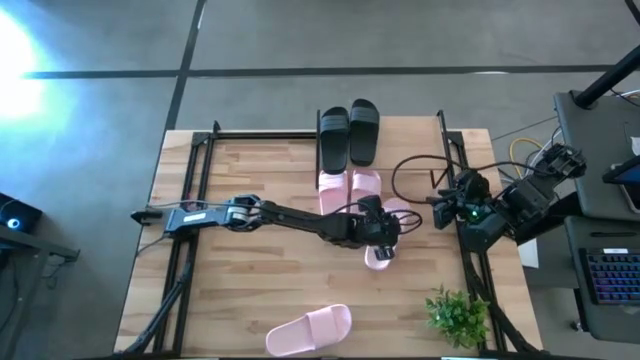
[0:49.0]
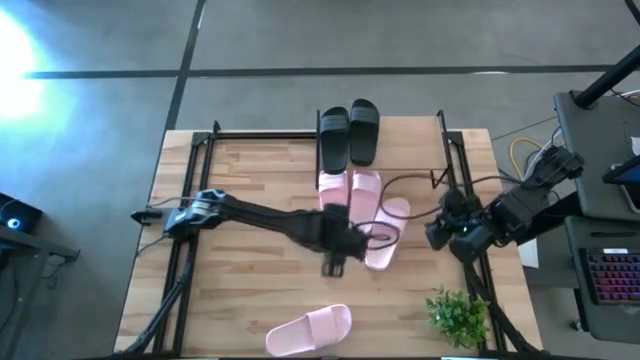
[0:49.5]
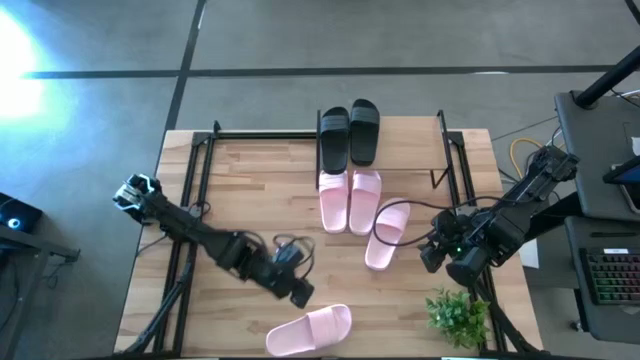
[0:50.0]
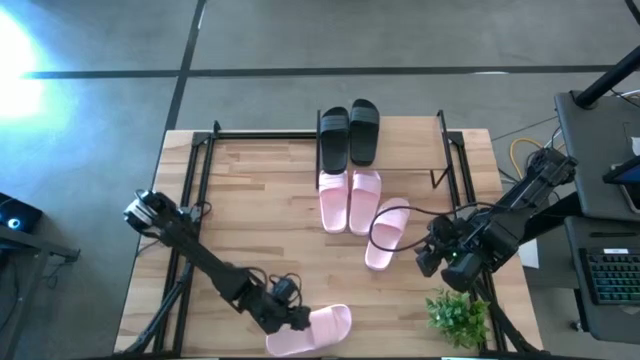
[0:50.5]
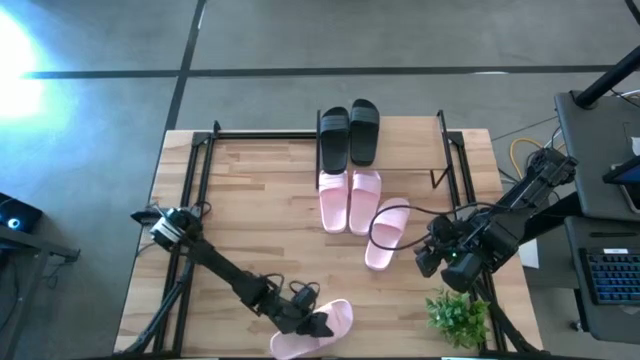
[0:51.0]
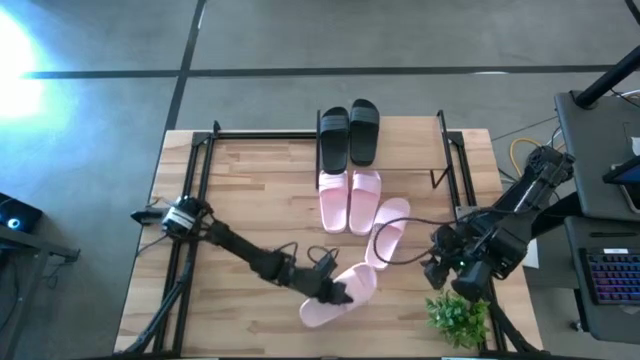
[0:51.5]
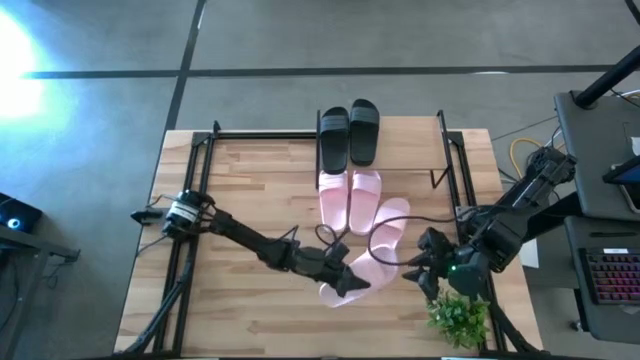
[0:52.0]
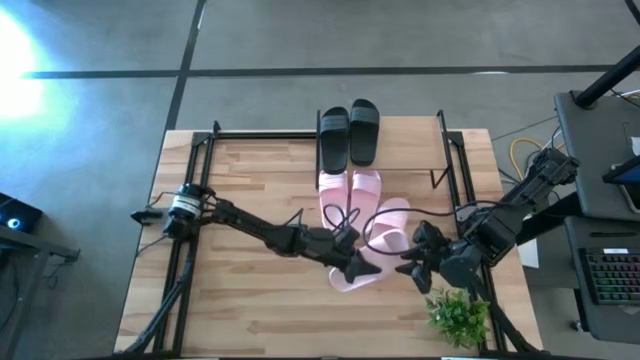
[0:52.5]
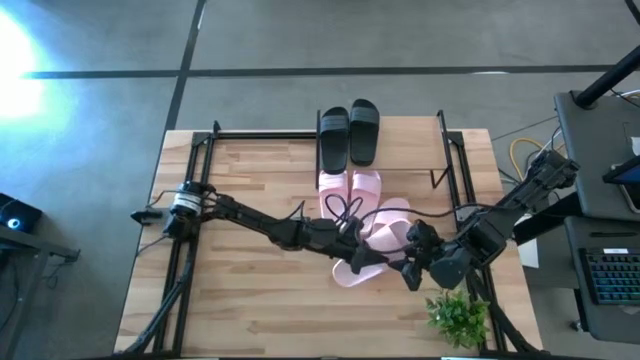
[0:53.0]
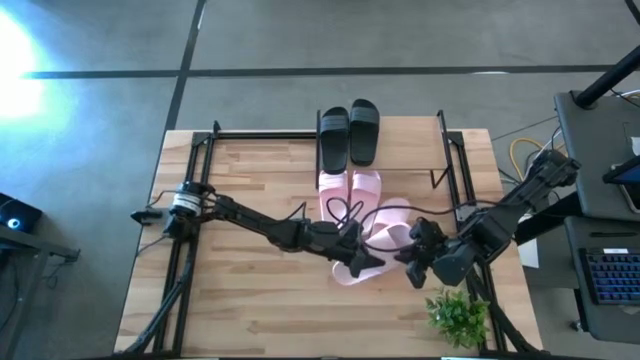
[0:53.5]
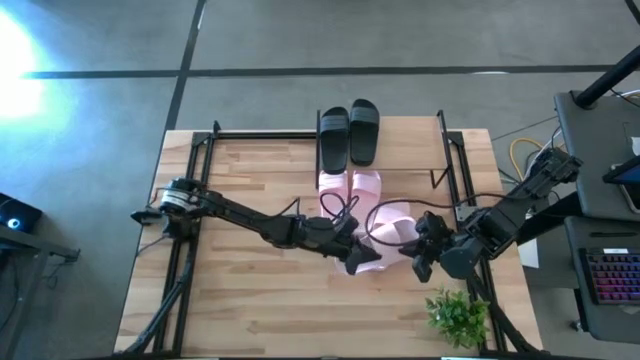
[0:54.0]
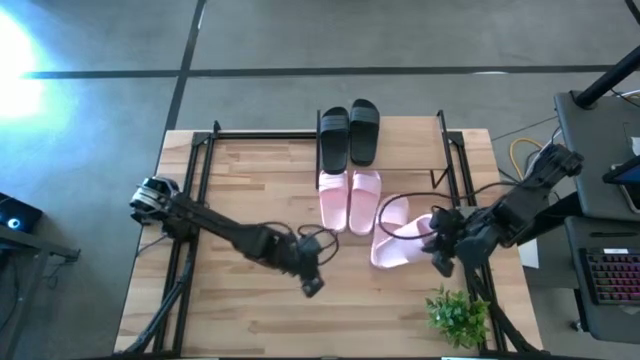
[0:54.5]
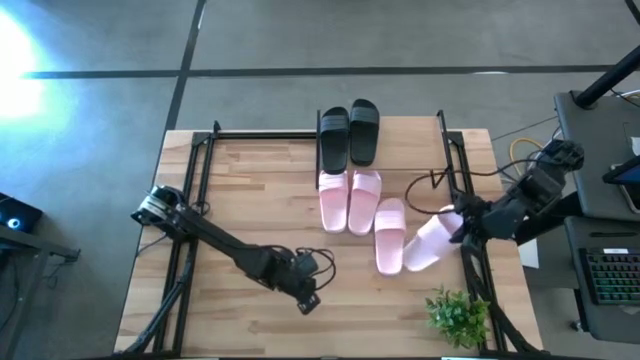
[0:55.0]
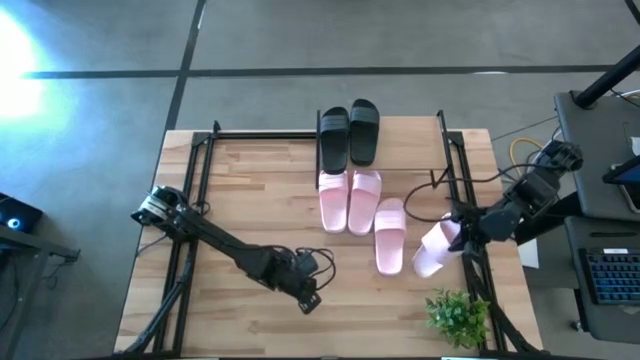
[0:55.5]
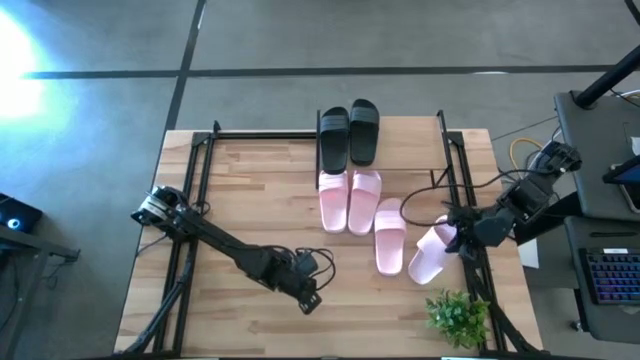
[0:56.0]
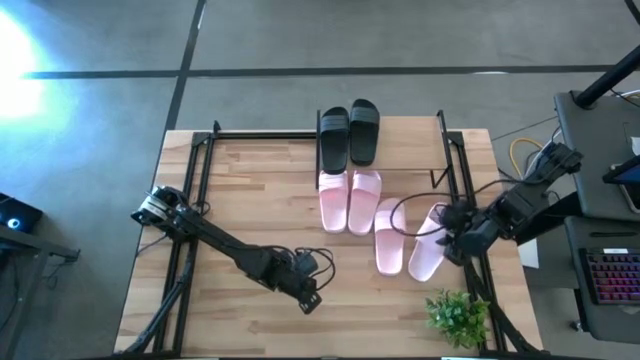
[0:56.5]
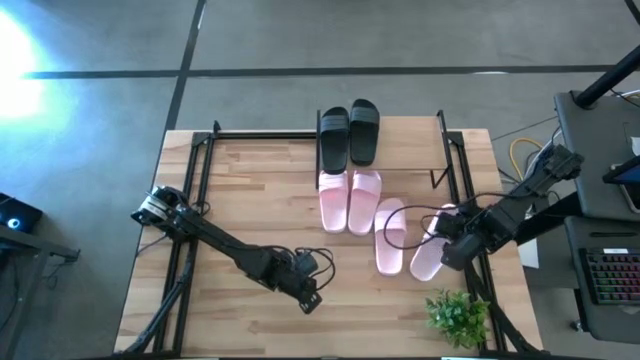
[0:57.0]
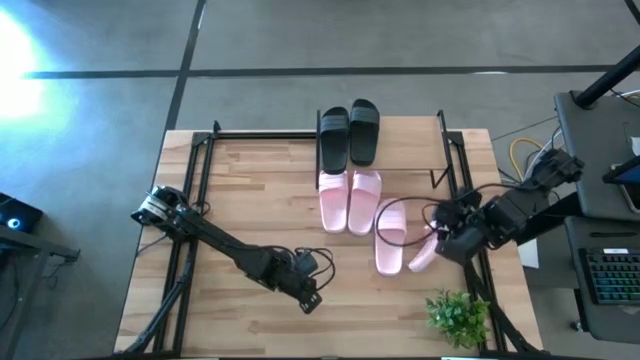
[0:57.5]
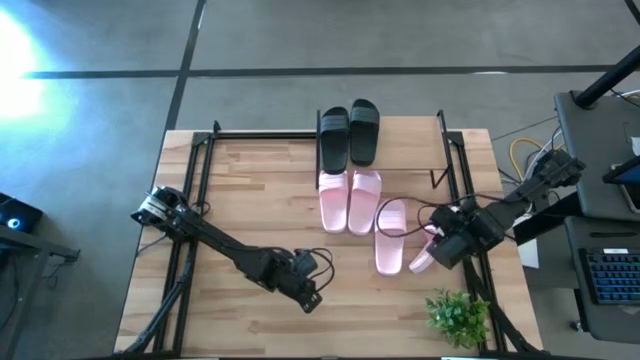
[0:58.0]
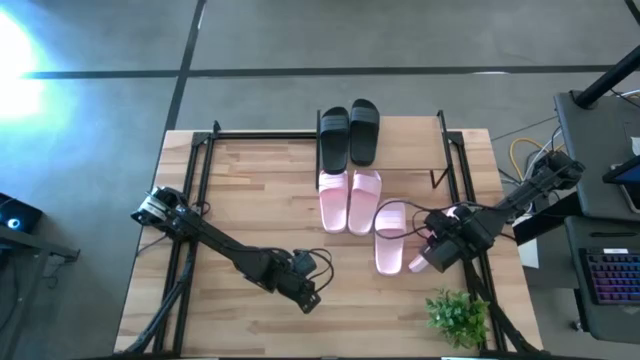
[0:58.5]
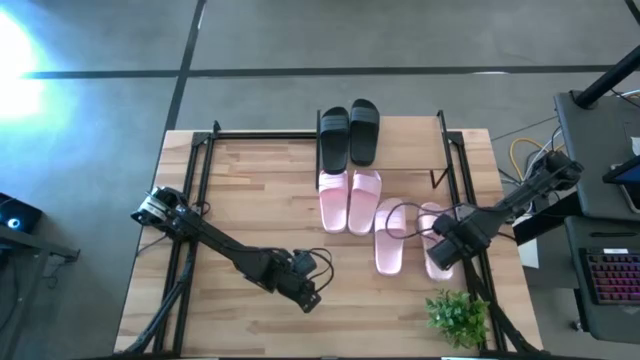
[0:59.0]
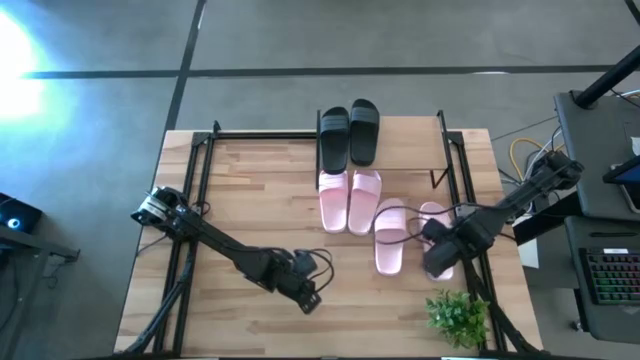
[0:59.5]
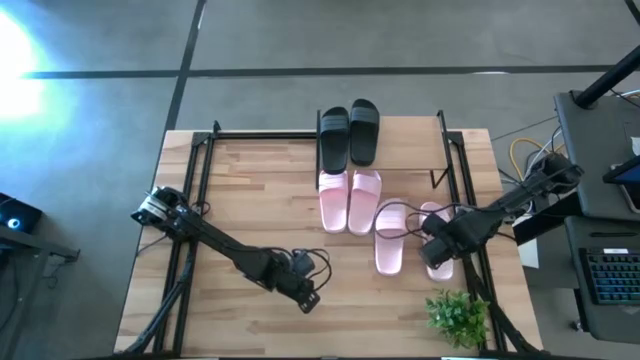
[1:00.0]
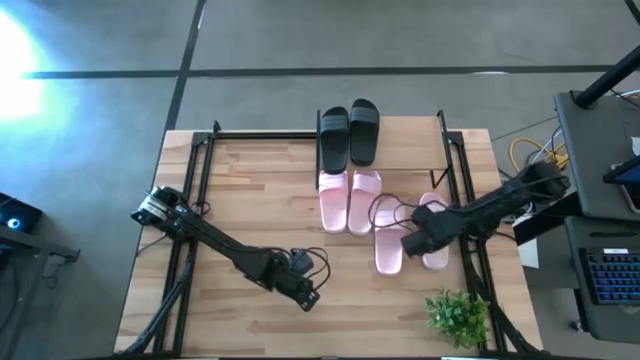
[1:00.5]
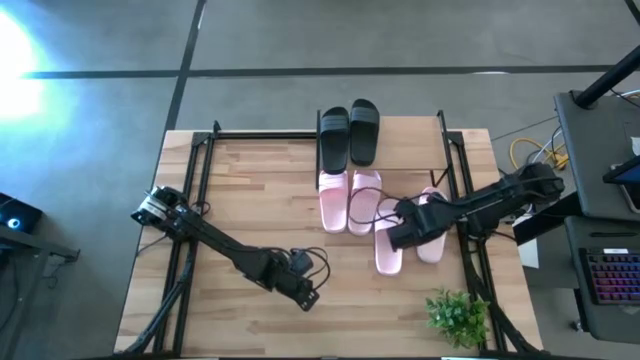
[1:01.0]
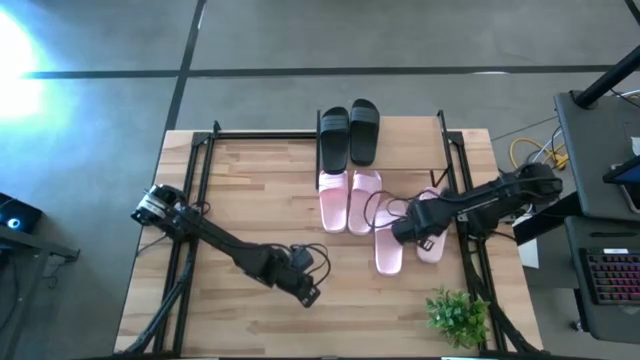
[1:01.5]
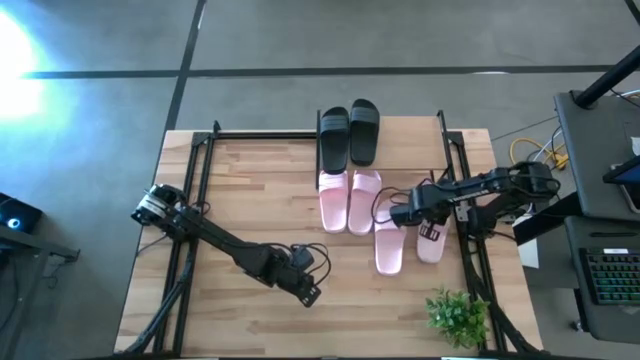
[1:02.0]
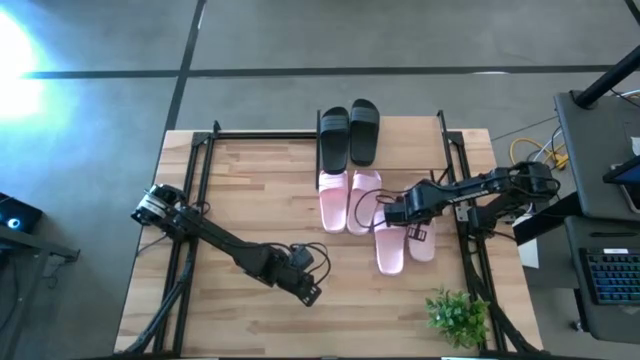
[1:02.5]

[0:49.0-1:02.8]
Task: Pick and place slides into the shelf
Put the pink slide under the shelf

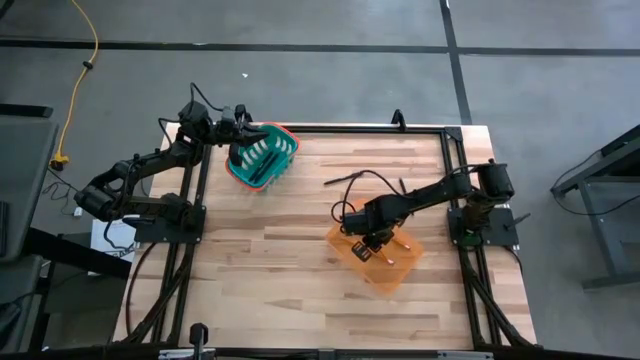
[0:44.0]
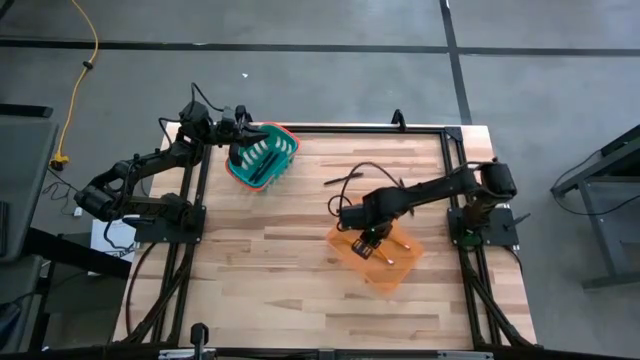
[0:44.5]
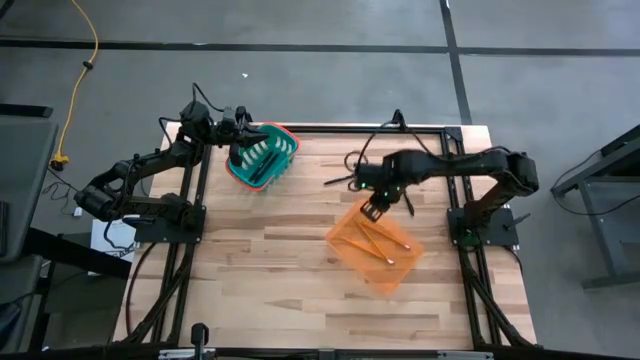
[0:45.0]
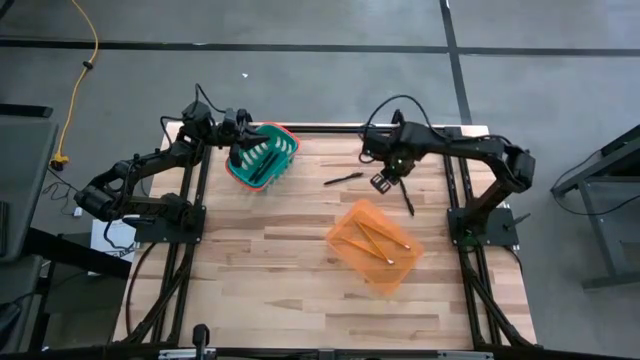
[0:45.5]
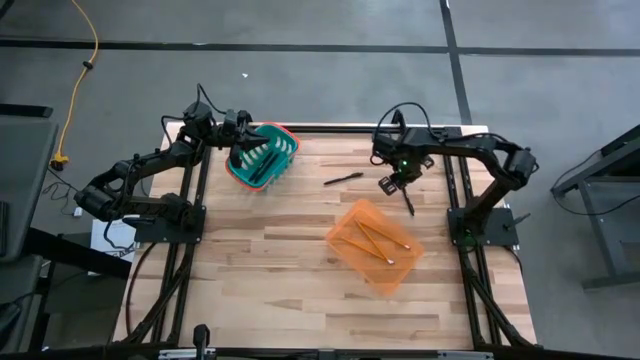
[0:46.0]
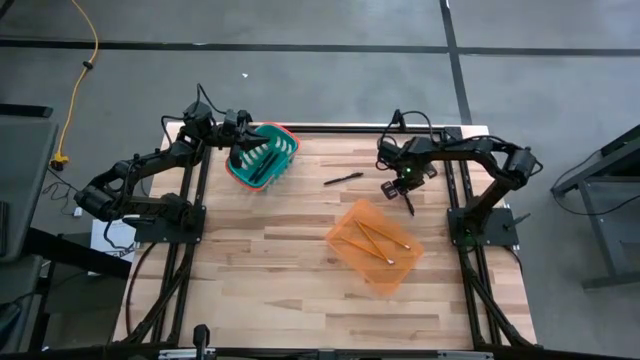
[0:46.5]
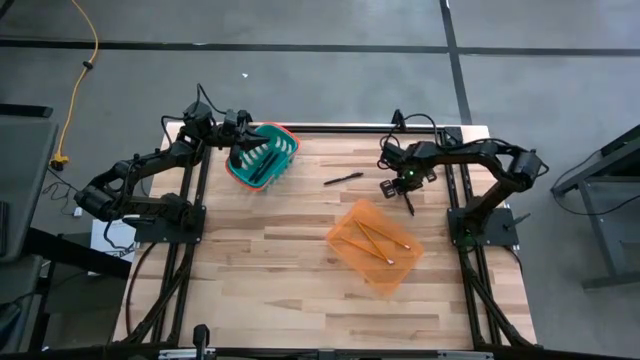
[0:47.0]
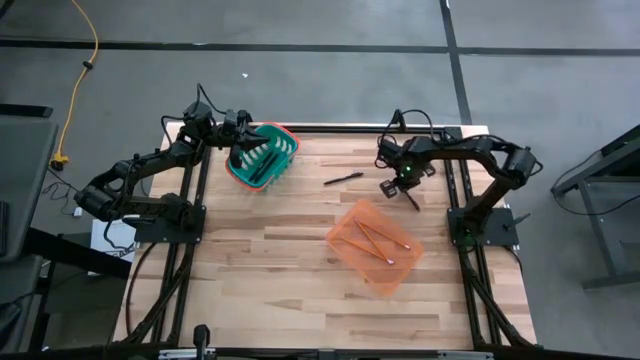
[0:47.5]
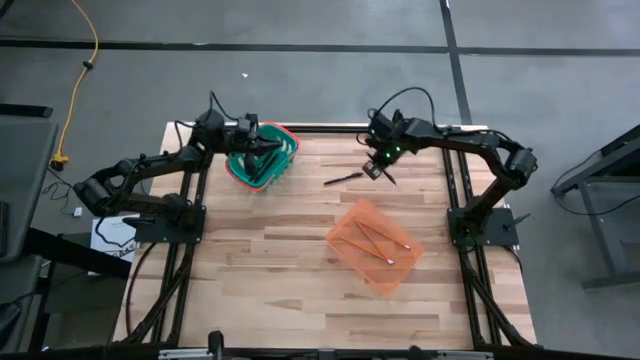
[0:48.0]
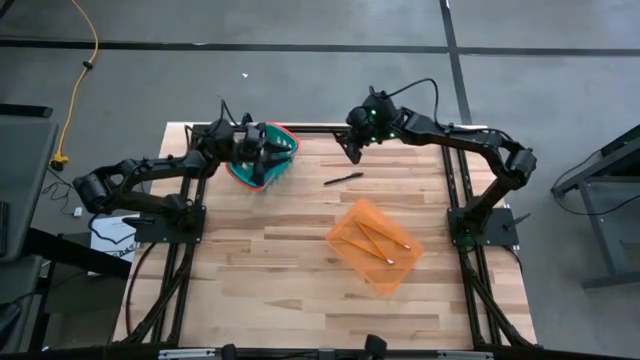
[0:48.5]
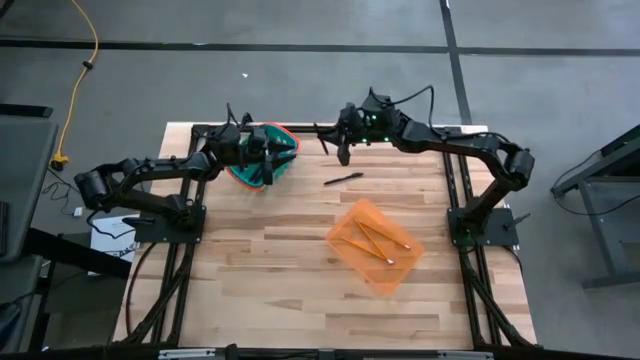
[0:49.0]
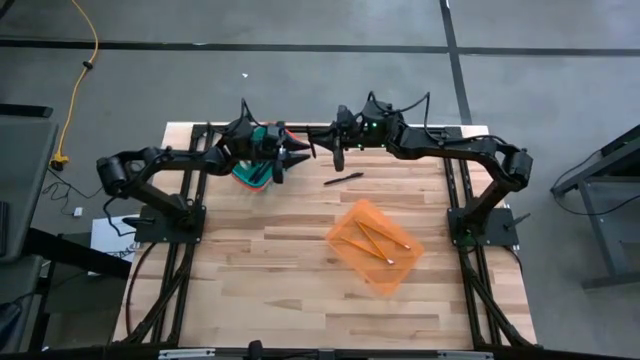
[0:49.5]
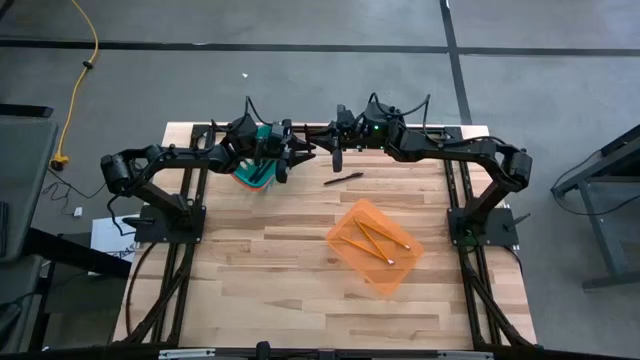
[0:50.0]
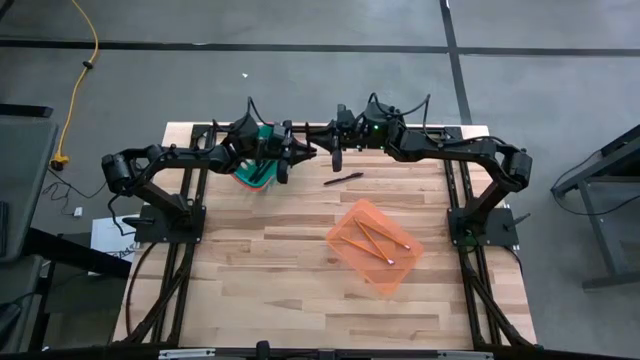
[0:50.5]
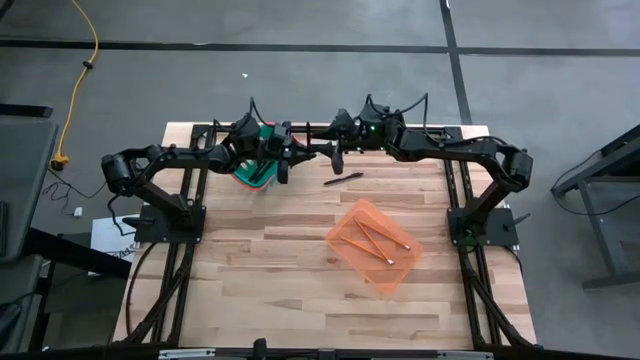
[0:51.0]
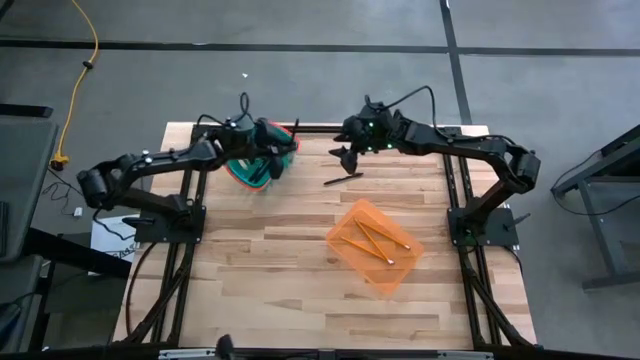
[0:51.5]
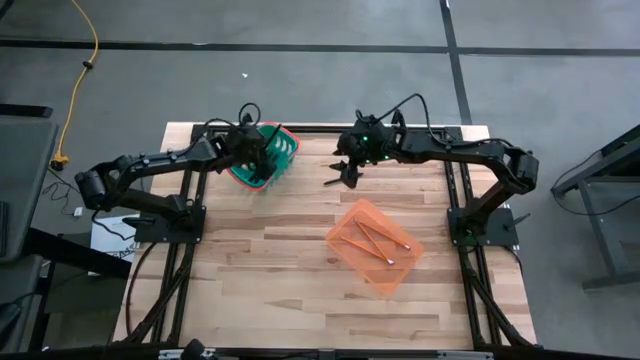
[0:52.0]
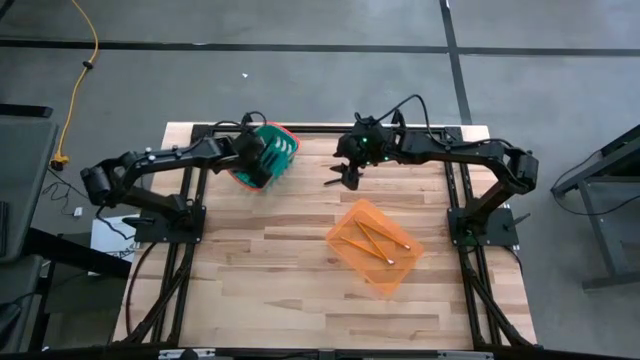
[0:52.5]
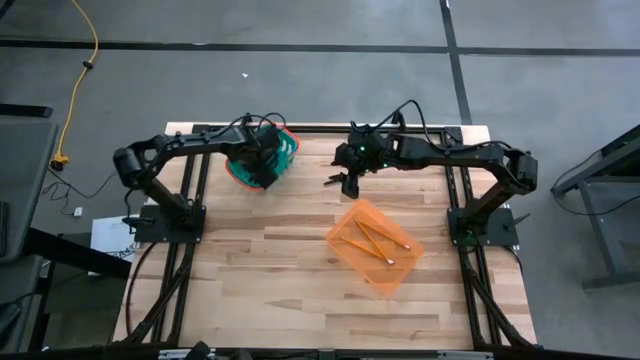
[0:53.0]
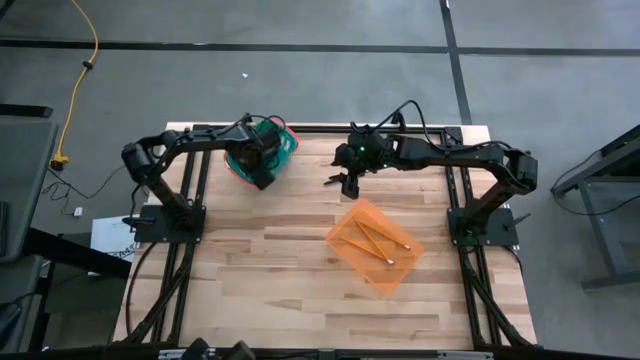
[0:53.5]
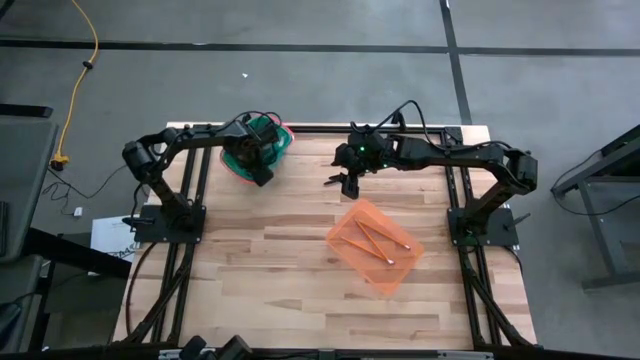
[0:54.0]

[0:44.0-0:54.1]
Task: Sort pens & pencils
Put the black pen into the blue bin
